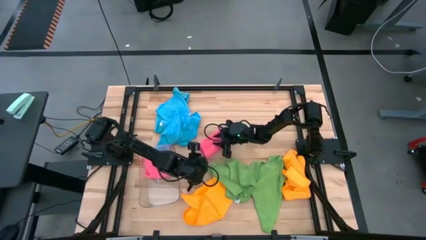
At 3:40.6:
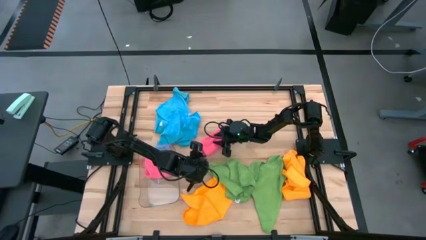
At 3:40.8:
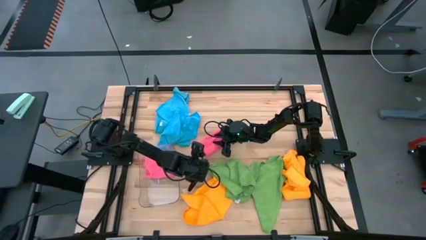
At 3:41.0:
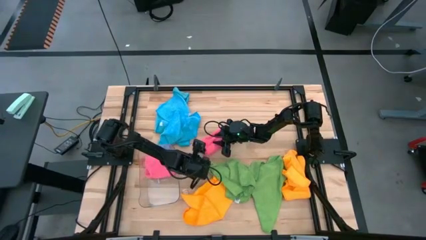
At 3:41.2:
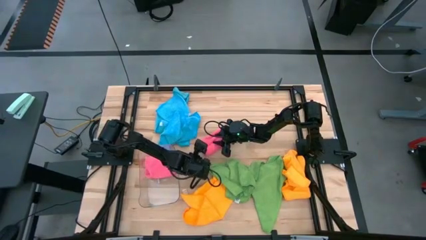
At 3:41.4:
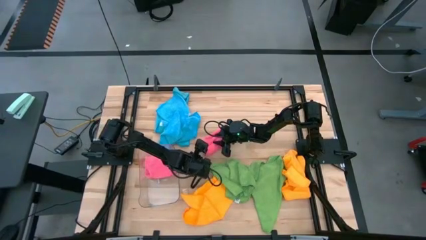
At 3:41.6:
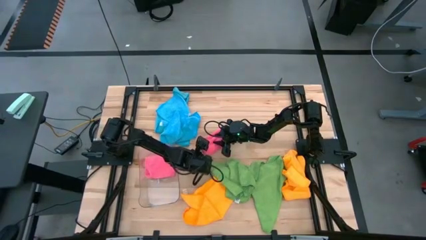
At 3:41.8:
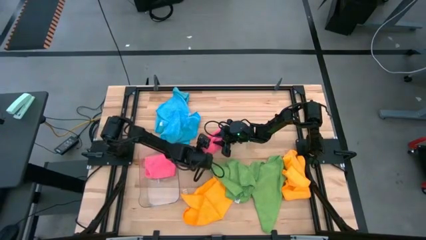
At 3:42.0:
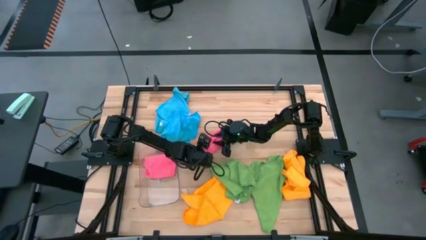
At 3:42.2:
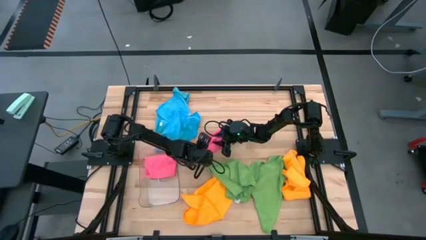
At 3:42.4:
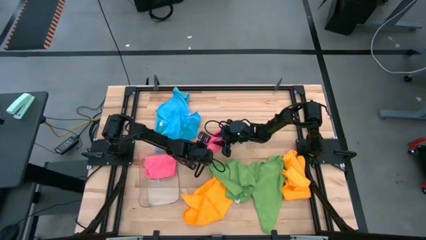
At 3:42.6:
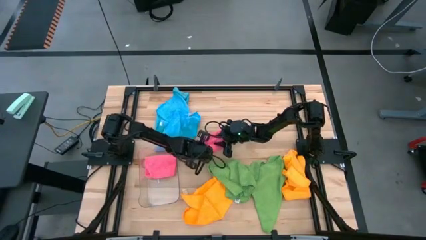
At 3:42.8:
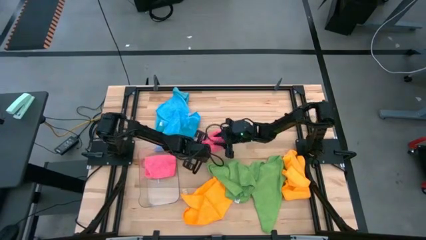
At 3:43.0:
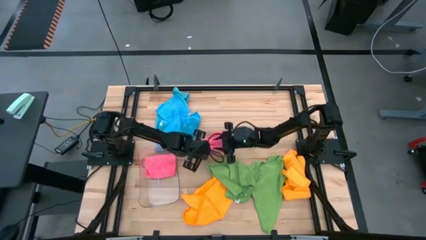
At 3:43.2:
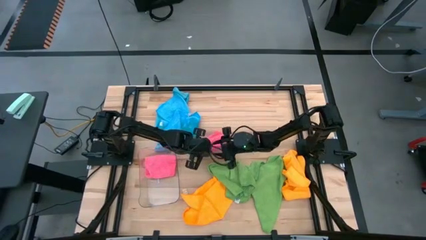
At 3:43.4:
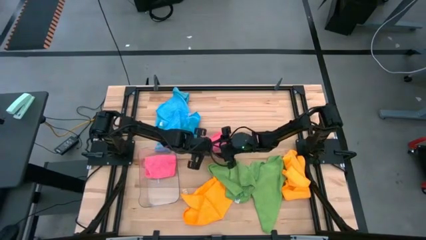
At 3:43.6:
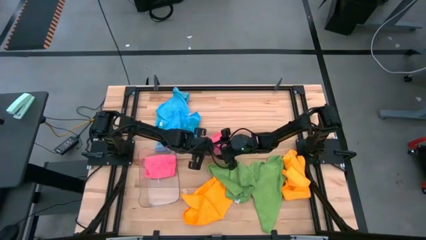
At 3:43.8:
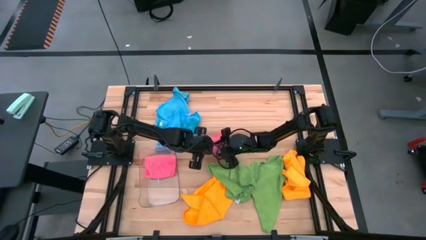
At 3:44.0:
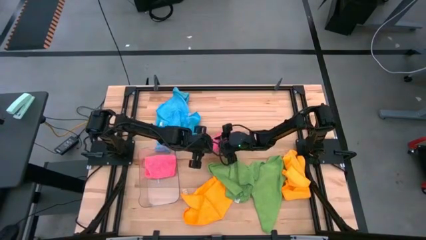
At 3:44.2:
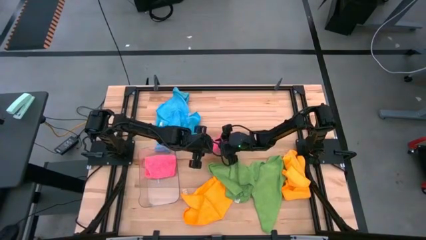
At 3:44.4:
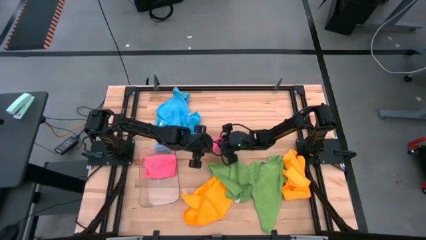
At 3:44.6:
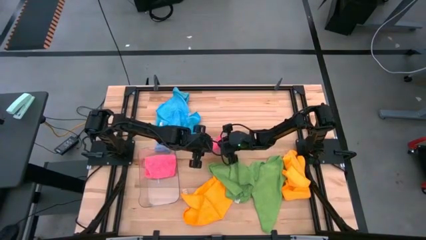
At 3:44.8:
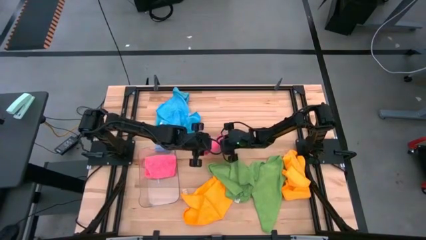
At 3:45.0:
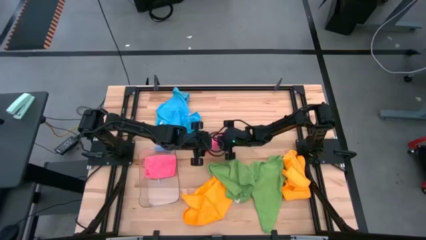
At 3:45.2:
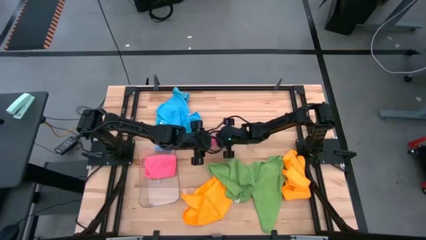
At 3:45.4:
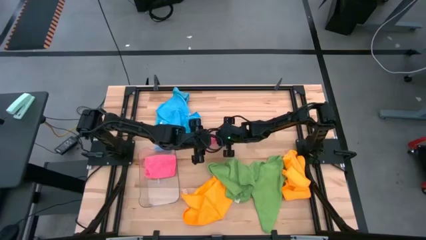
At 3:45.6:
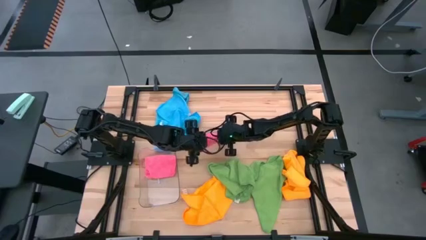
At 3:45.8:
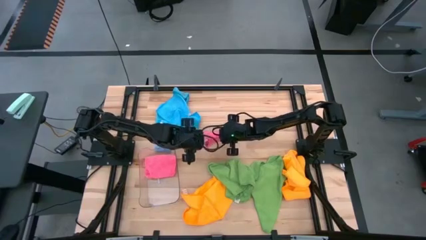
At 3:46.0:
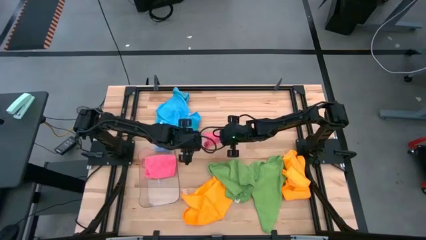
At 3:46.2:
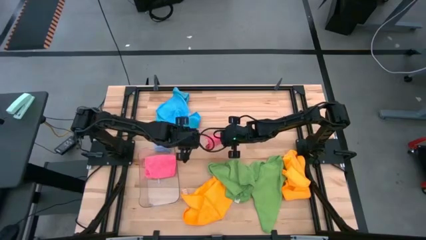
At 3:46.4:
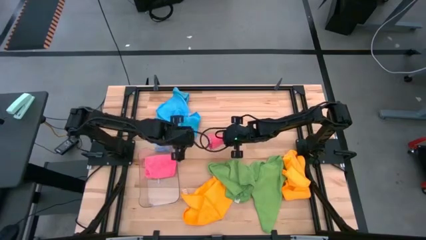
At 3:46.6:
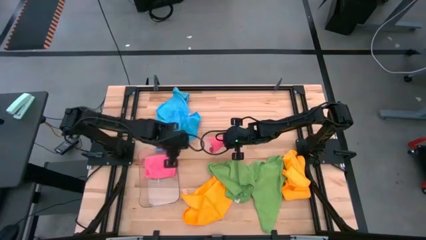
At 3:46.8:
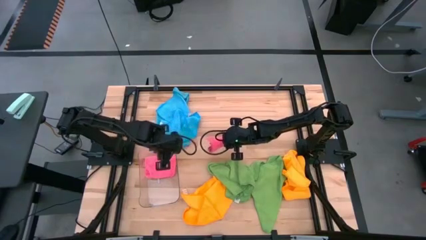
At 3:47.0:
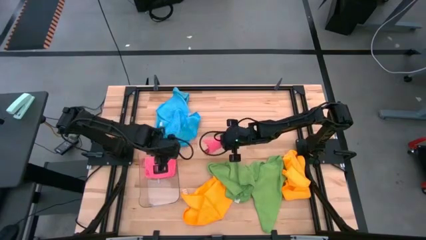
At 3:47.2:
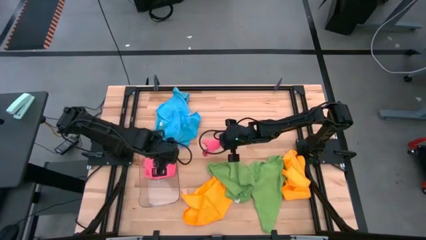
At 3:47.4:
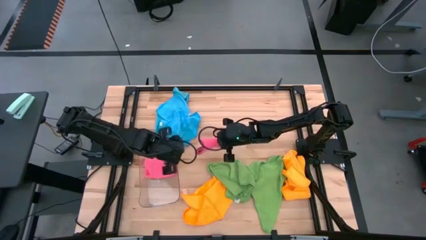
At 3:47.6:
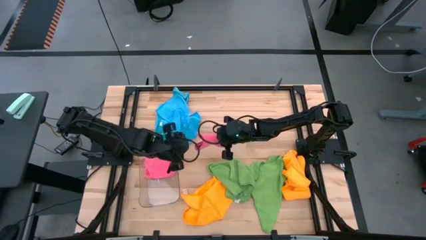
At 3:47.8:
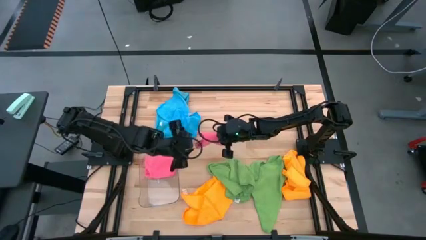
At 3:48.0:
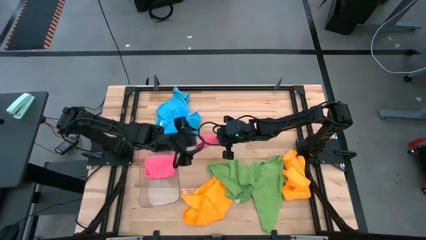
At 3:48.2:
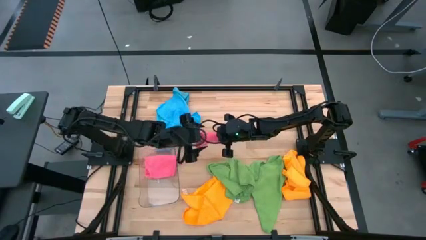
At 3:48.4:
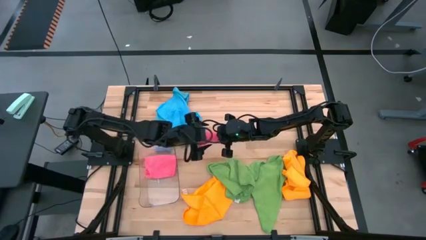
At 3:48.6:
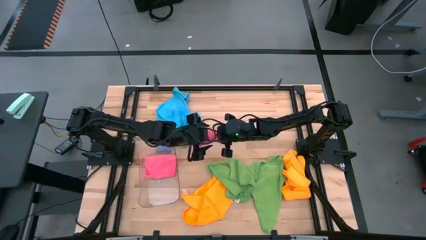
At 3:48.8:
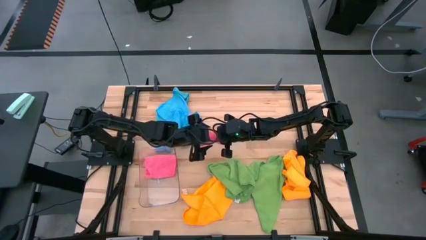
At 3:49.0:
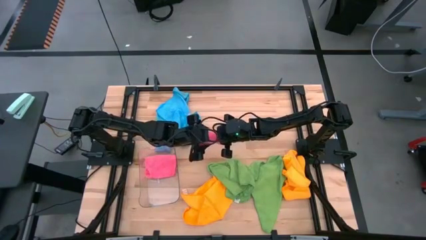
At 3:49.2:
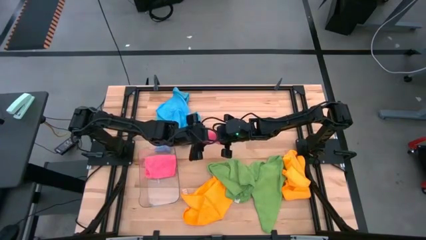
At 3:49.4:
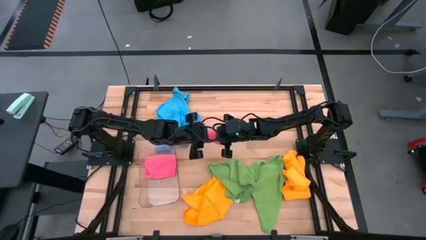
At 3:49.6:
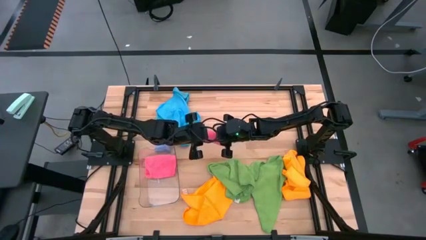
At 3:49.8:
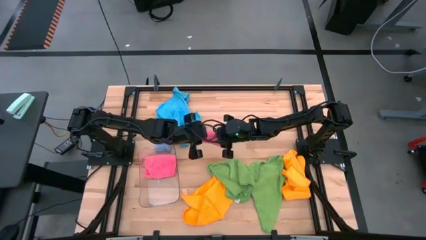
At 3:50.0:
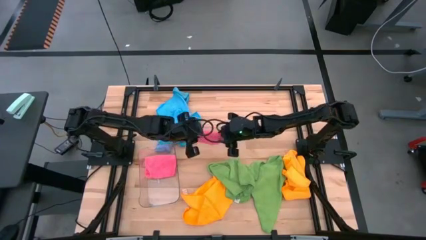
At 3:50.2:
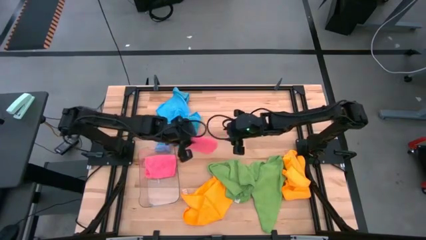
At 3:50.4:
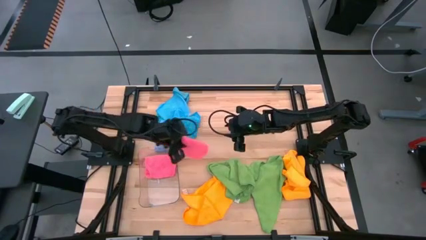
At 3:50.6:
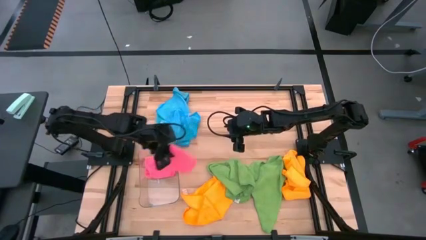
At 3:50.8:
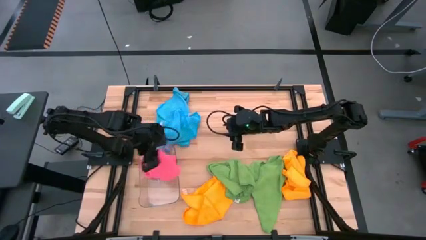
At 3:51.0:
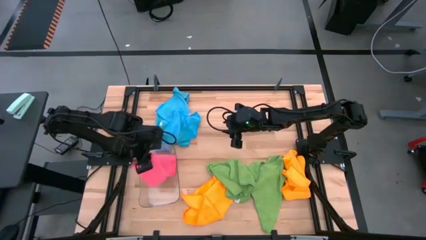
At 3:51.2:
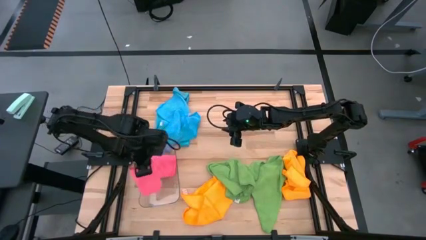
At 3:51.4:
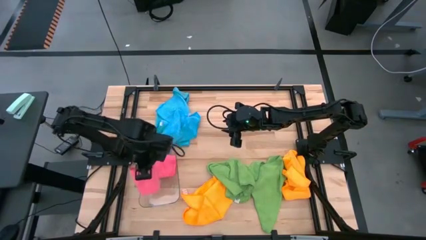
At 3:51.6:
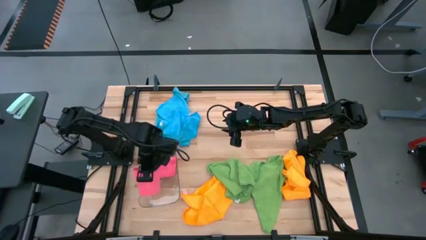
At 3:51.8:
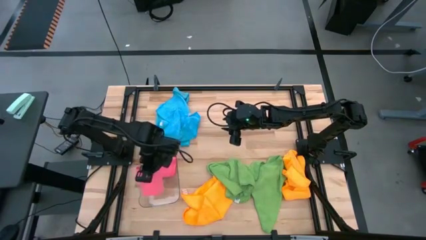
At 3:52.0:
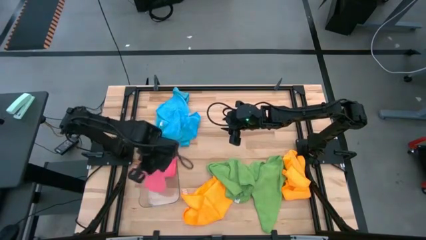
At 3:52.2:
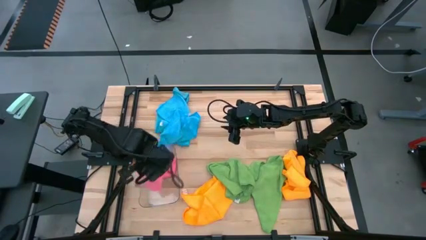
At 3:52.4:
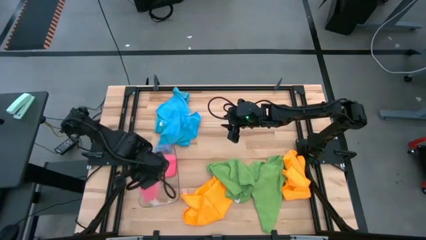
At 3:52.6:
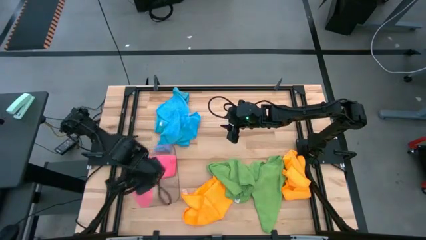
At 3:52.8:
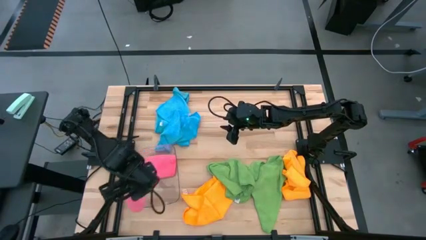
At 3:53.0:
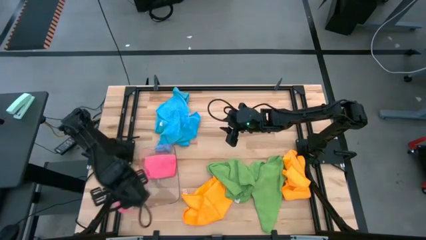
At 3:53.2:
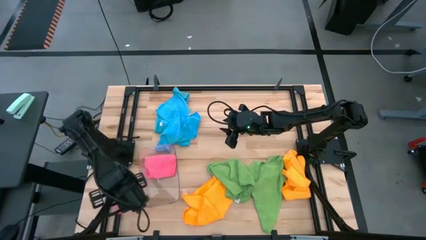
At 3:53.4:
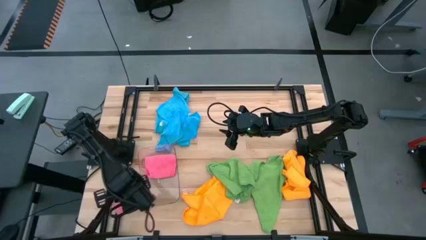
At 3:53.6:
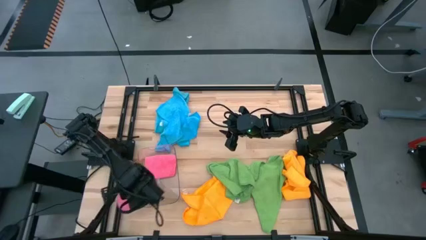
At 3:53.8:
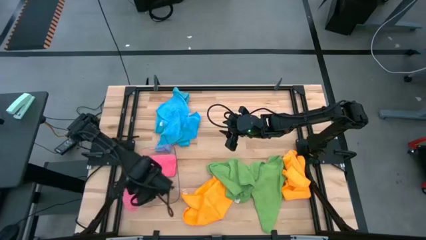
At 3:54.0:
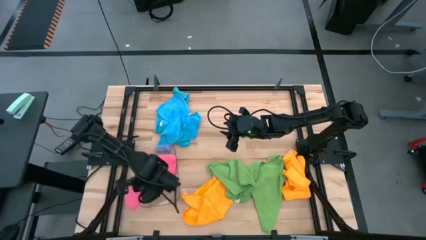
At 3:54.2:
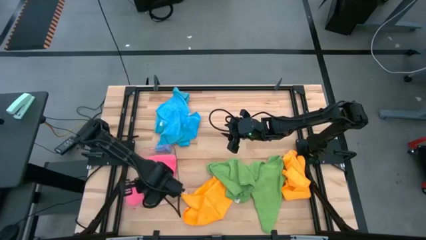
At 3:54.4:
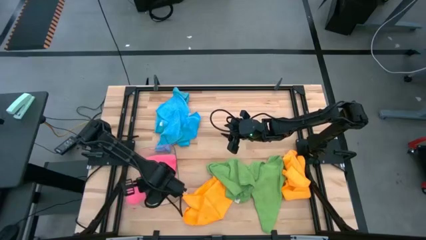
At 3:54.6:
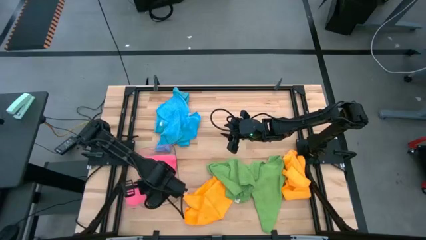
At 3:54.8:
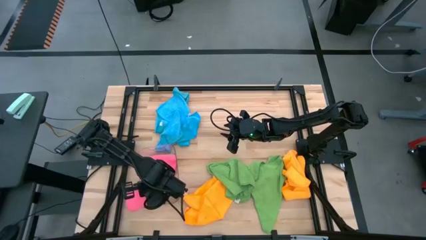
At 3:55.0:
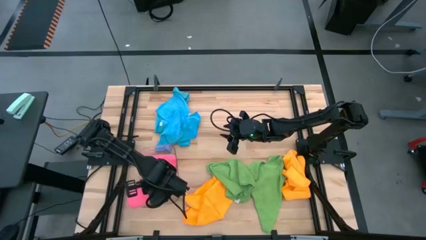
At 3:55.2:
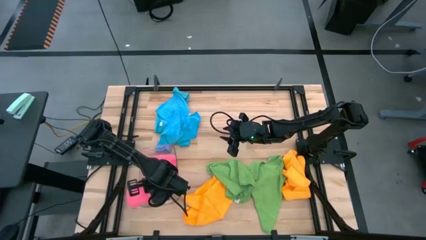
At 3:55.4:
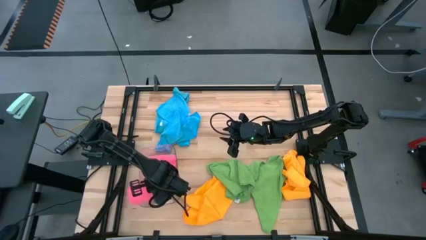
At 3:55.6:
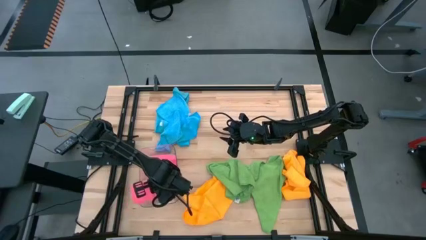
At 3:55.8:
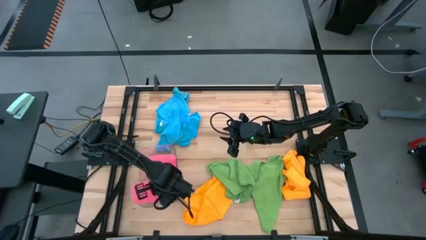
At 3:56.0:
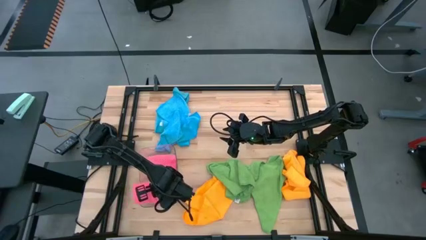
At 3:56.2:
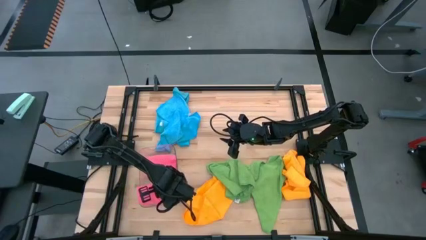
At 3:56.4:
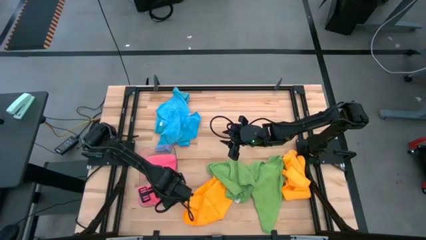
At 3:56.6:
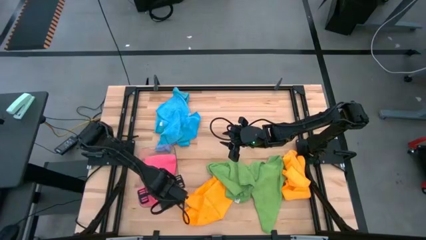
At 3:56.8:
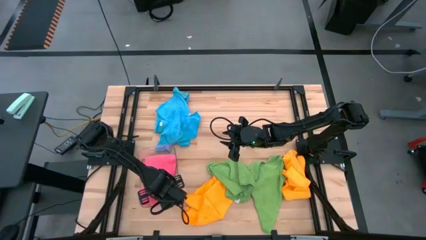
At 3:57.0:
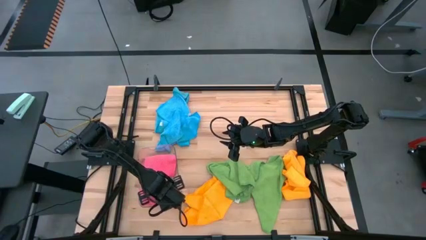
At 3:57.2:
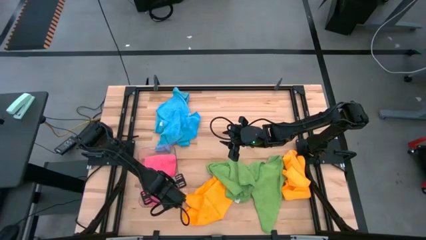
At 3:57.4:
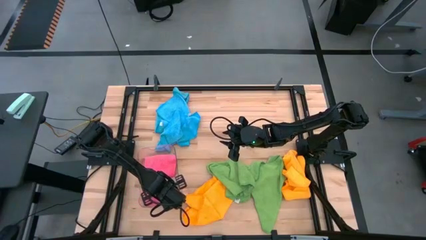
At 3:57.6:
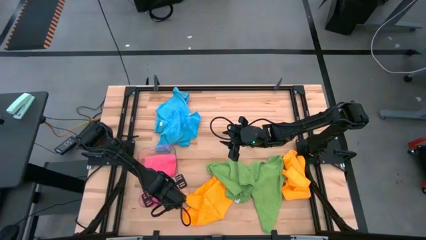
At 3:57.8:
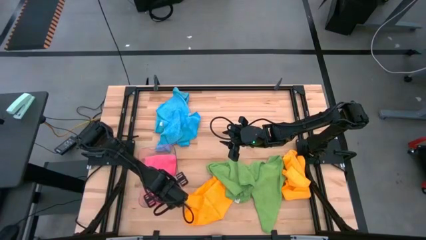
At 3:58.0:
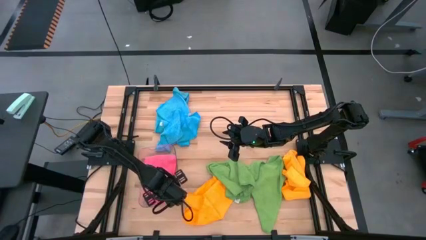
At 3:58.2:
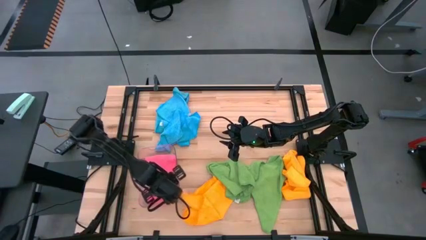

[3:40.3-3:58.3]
Task: Fold microfiber towels
Put the pink microfiber cloth into the transparent bin
